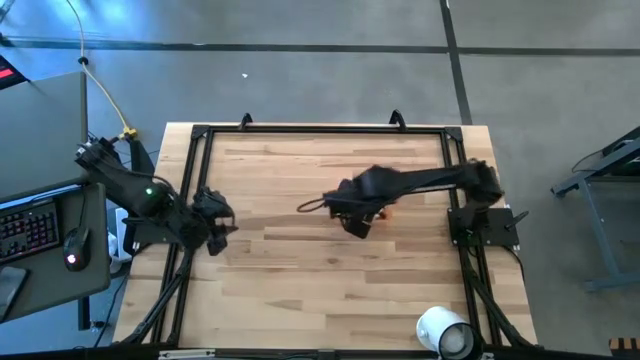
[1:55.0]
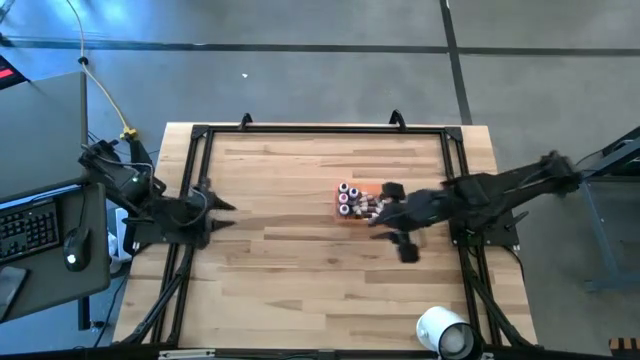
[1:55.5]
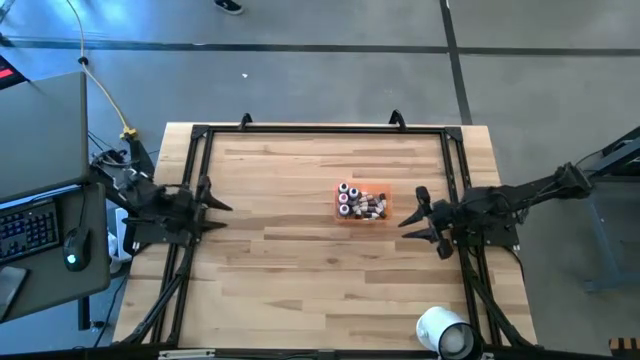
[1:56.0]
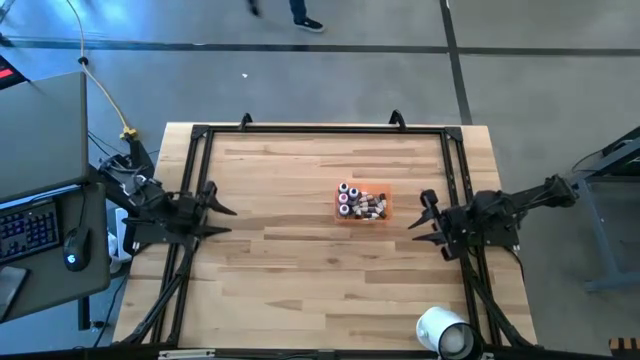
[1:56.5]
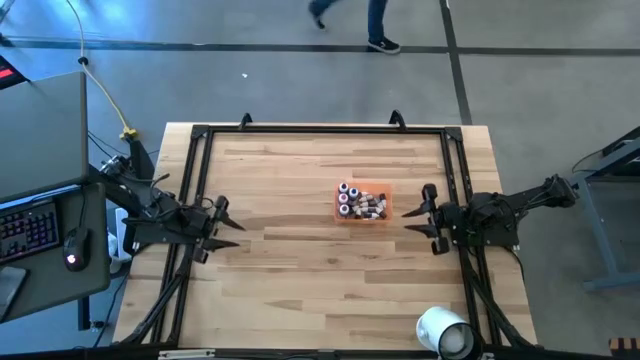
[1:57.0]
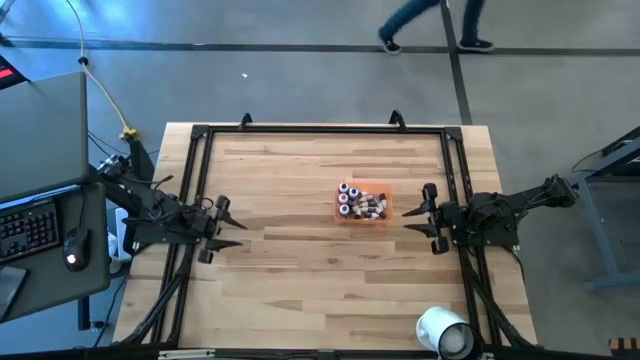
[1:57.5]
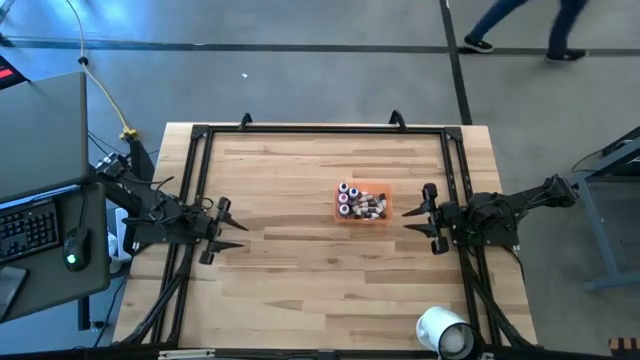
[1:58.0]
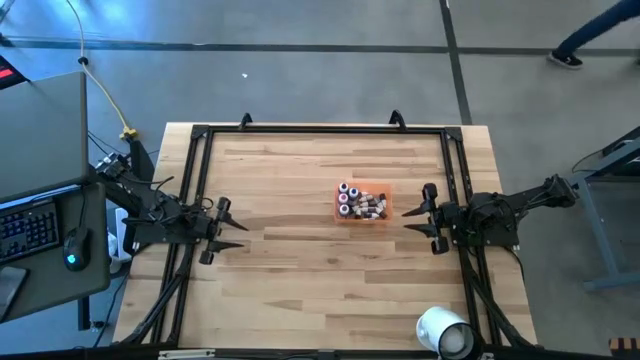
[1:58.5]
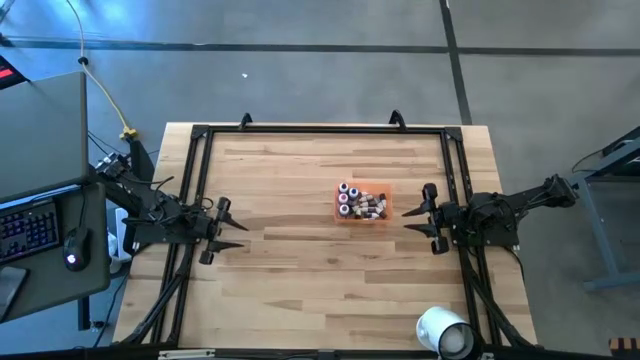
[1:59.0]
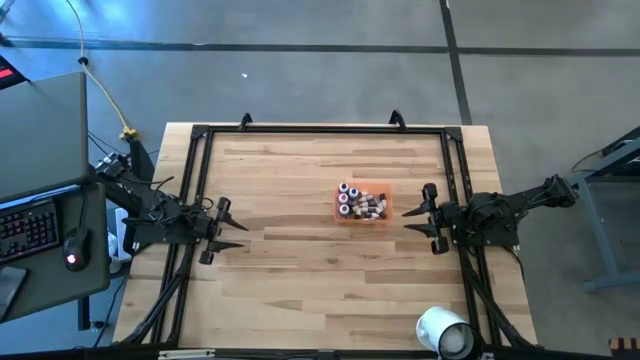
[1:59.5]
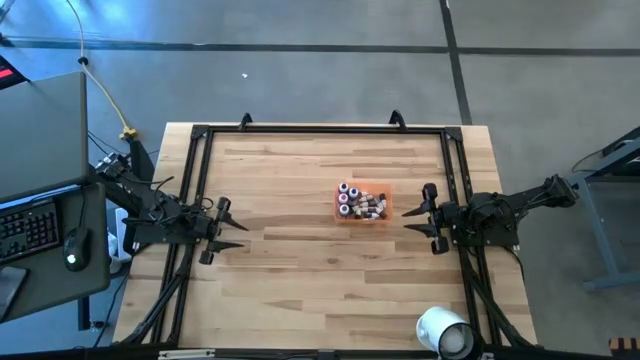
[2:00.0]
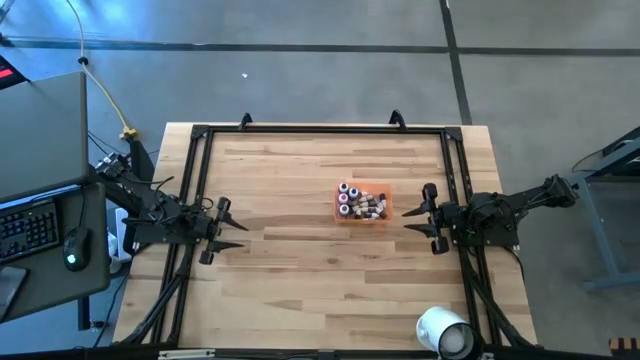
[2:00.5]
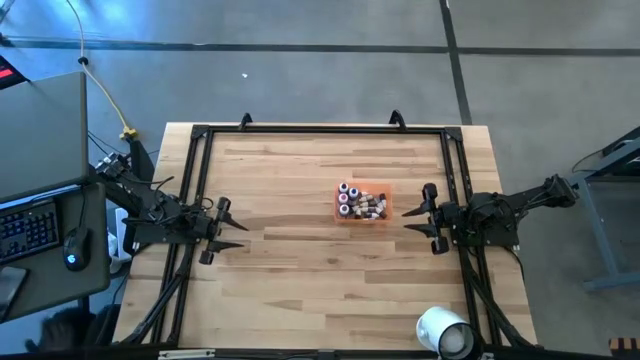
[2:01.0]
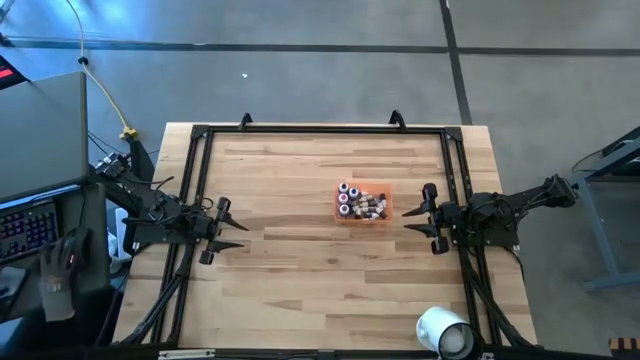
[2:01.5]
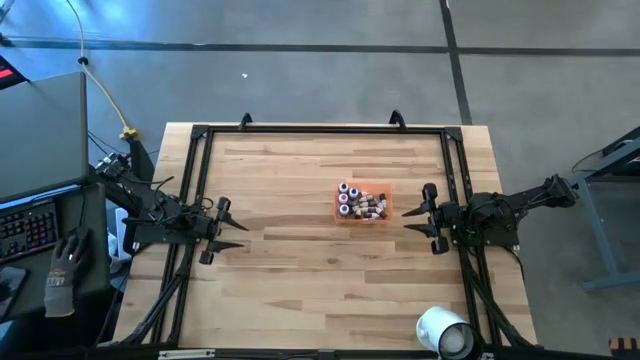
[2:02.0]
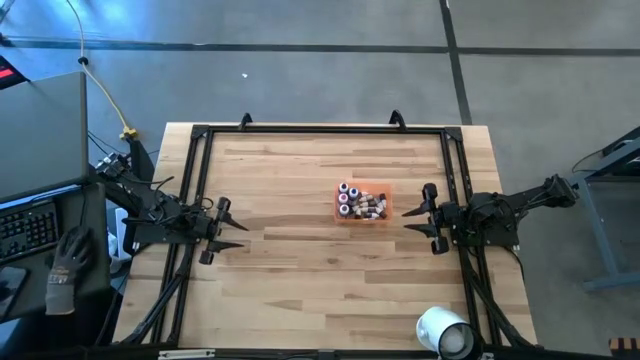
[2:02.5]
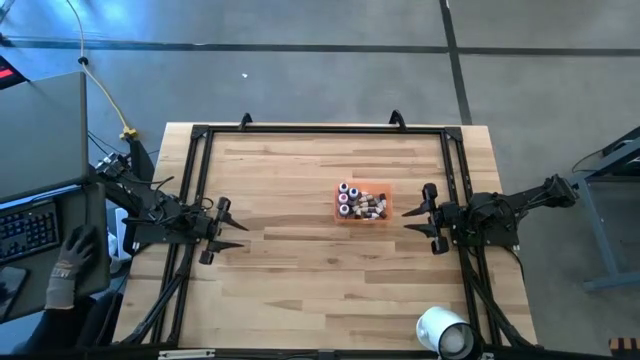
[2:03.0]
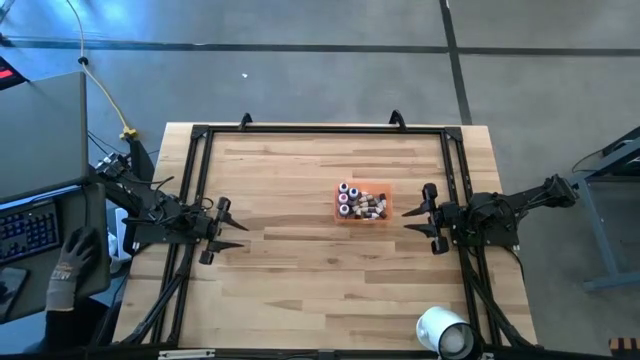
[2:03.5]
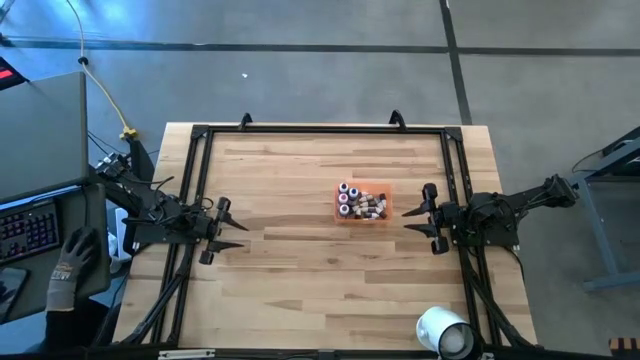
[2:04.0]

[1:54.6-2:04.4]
Task: Pick & Place food coloring
Return to Home Position

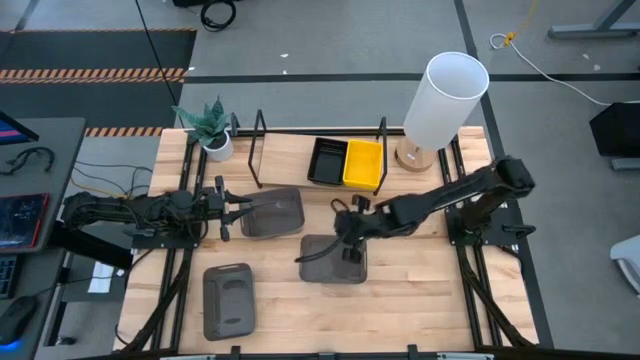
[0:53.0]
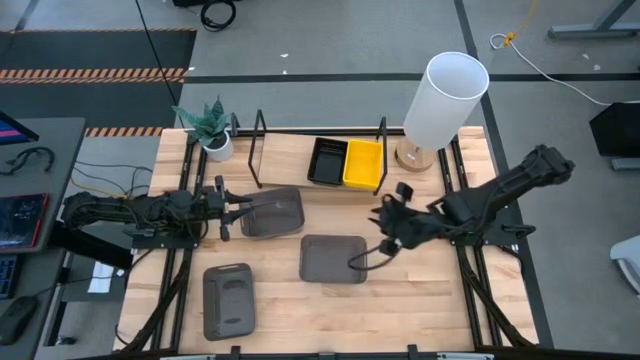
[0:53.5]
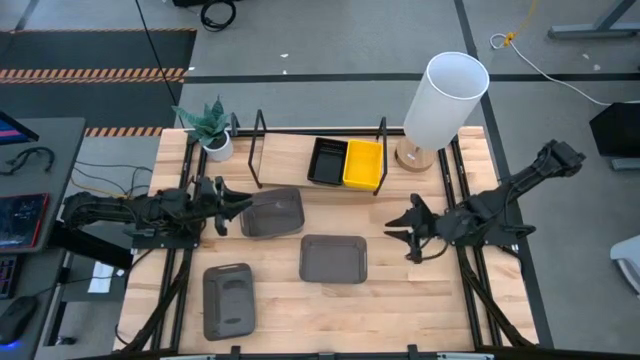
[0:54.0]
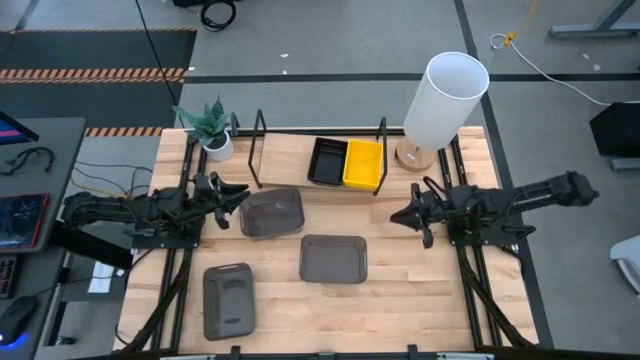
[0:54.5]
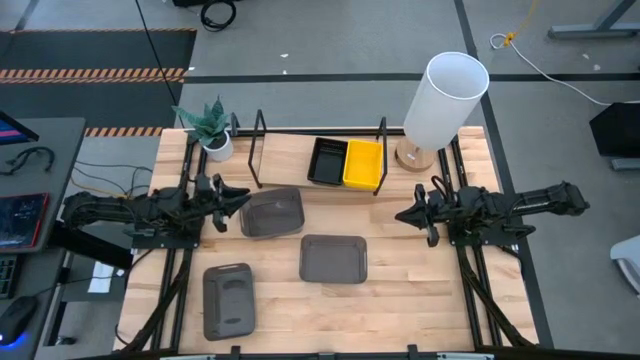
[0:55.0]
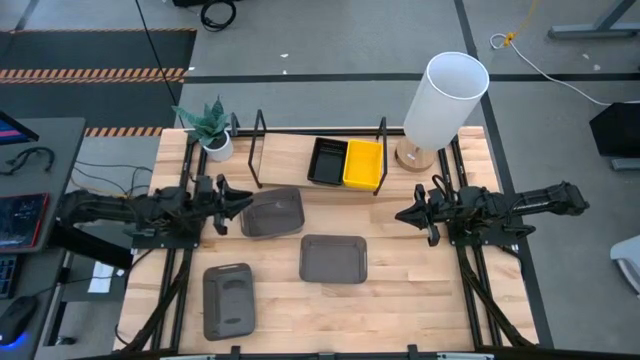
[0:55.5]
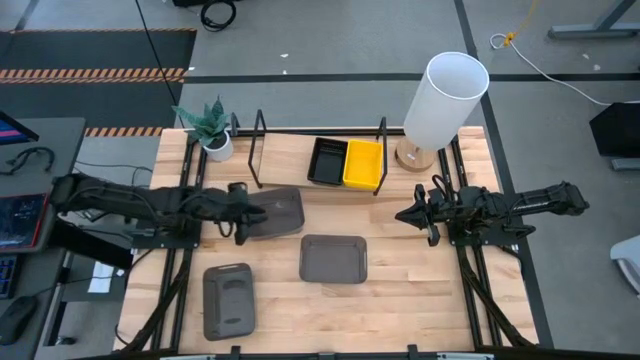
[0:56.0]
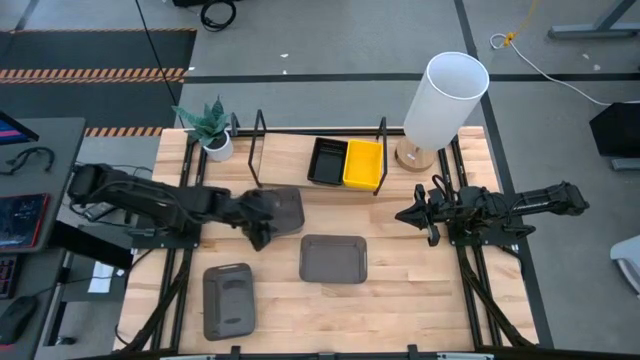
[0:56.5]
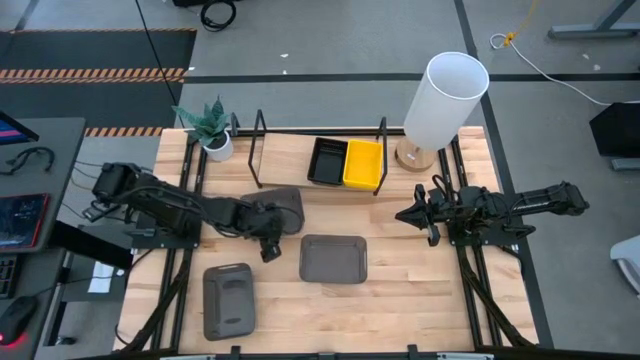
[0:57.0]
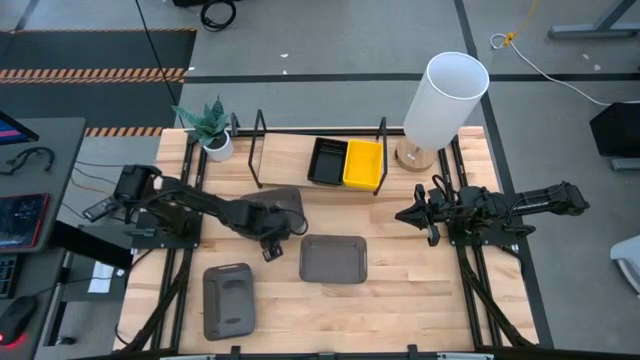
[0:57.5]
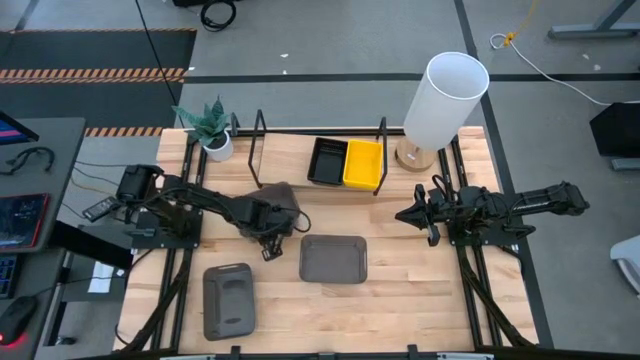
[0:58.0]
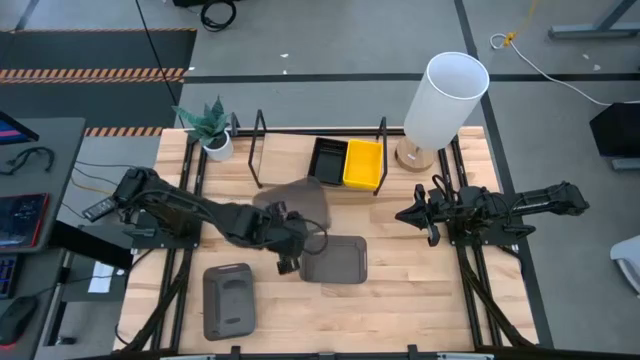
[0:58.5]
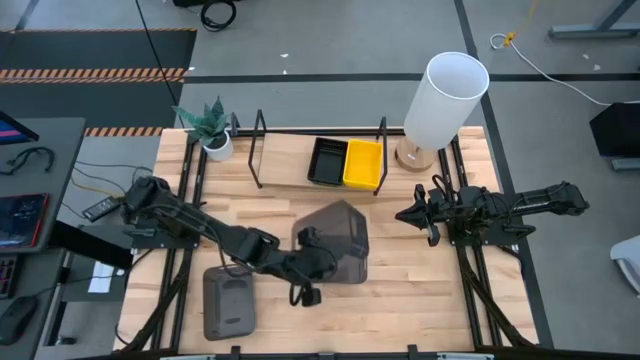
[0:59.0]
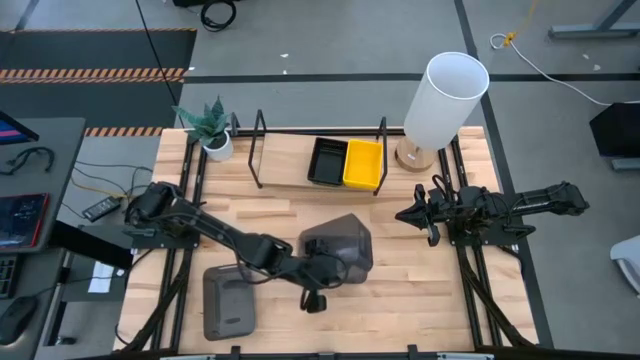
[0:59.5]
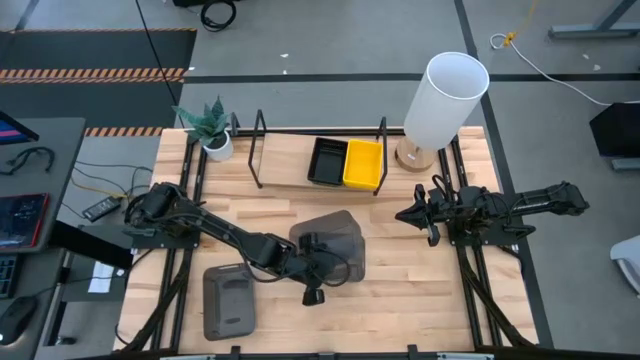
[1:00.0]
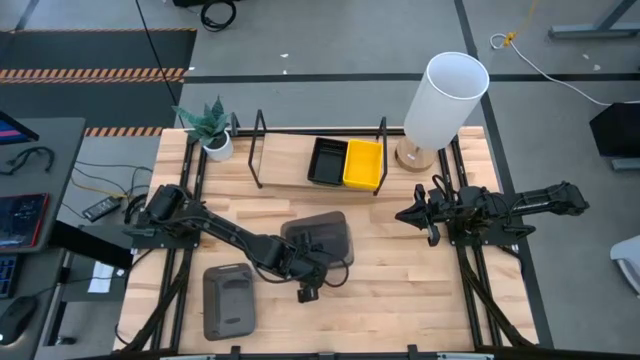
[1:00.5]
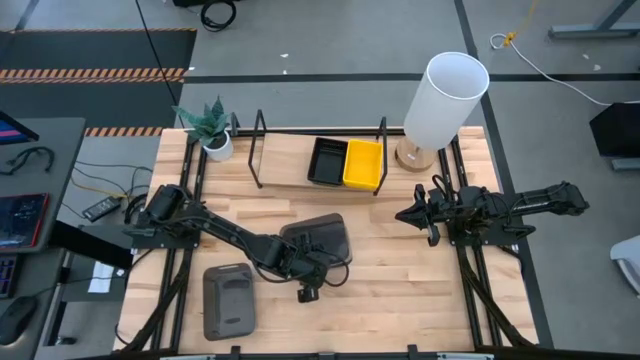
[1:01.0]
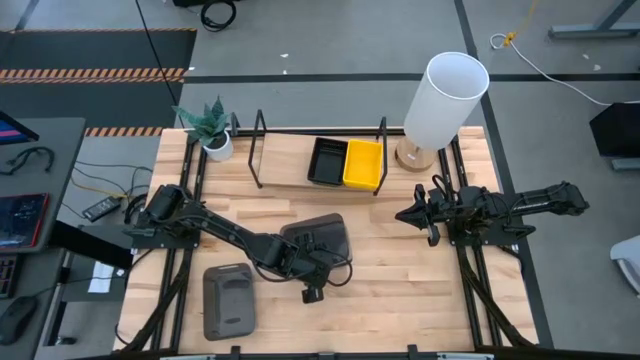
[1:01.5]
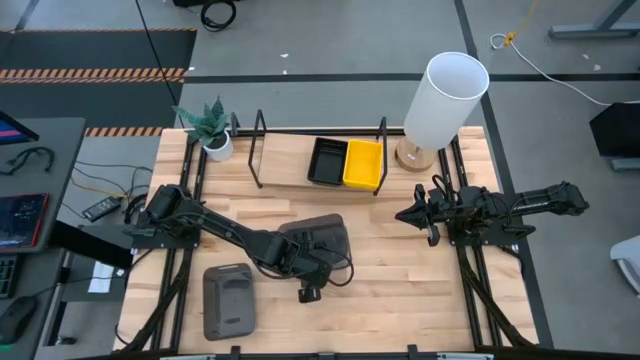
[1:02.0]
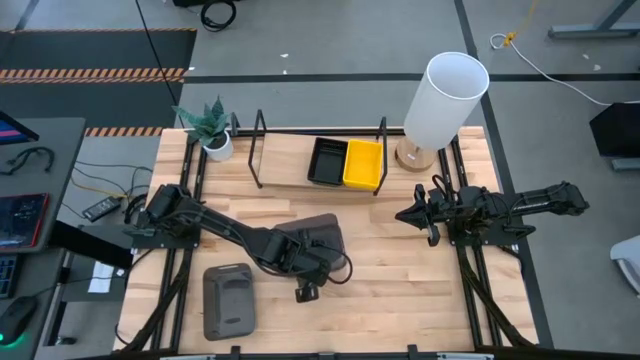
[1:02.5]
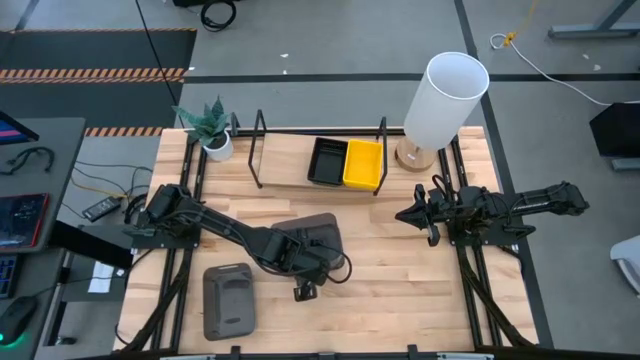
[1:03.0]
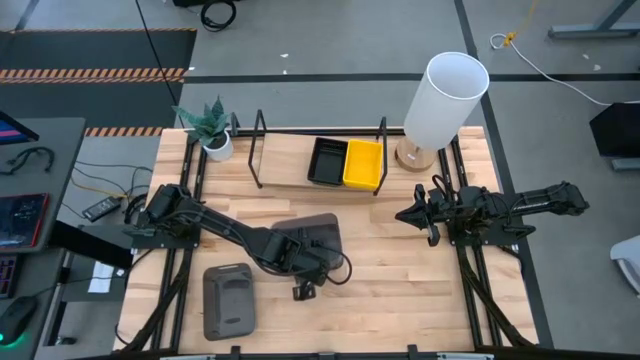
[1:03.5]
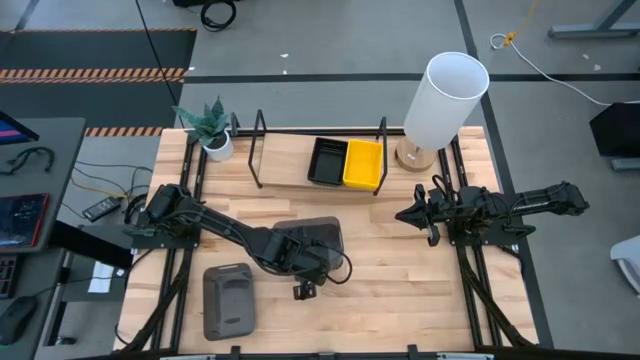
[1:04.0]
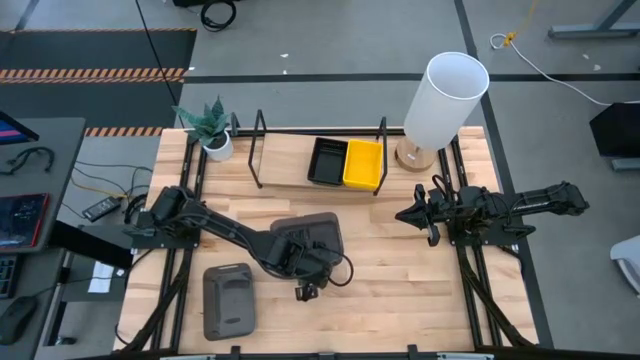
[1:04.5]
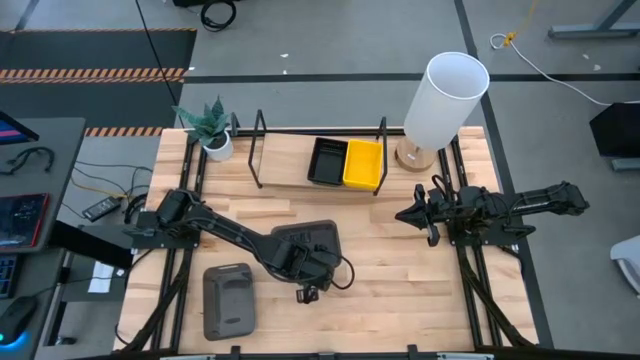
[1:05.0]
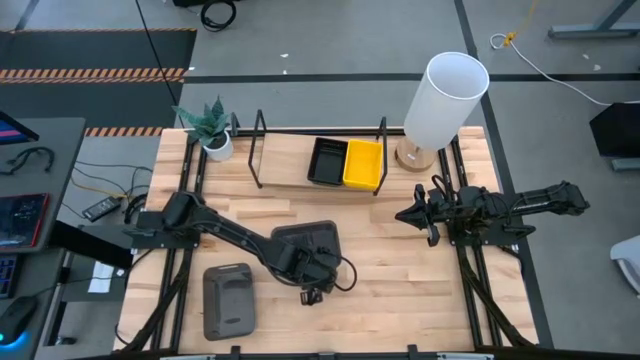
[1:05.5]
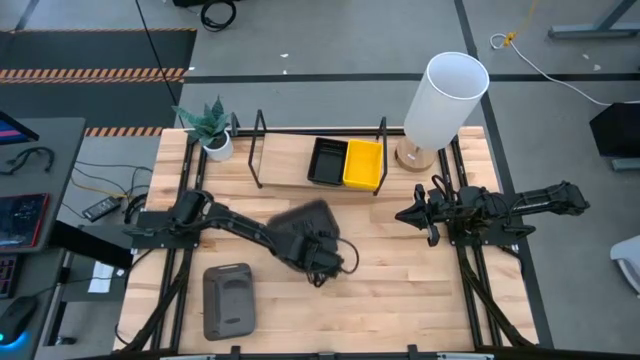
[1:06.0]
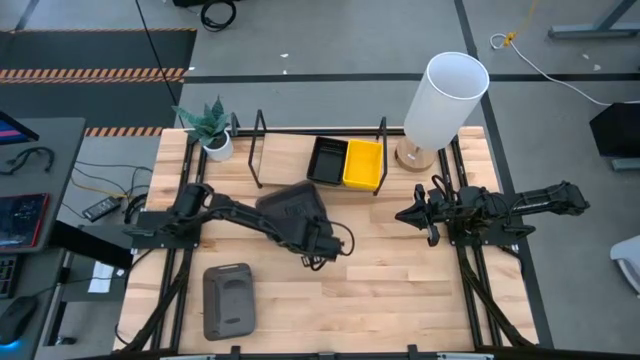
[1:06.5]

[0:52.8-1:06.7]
Task: Stack baskets on shelf by color
Stack the top transparent black bin on top of the middle transparent black bin
